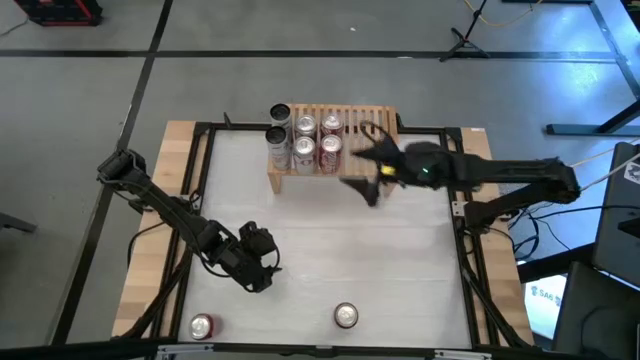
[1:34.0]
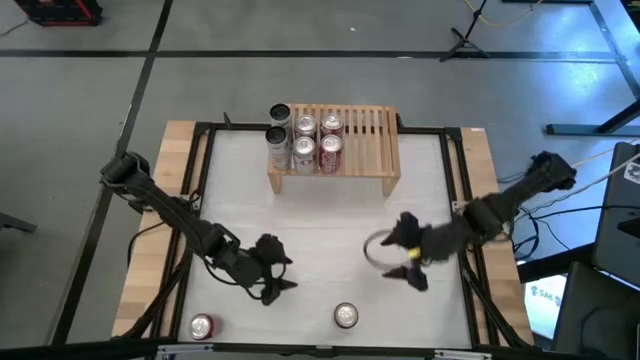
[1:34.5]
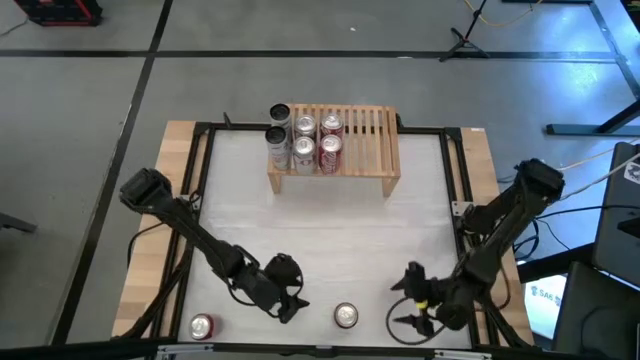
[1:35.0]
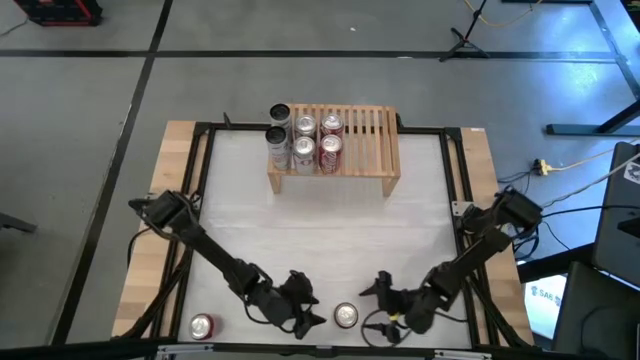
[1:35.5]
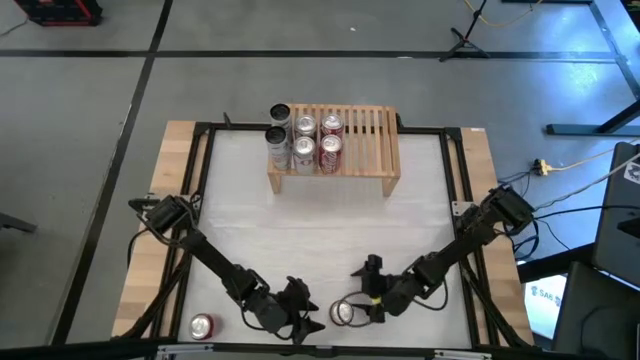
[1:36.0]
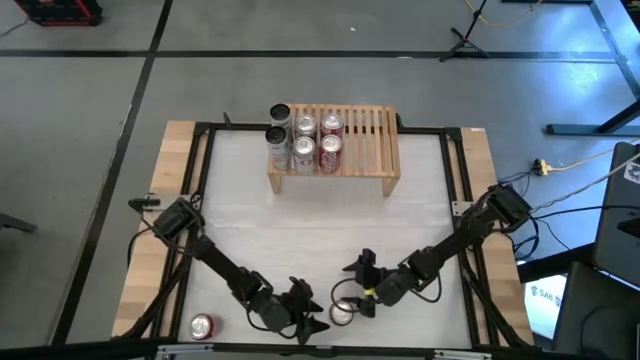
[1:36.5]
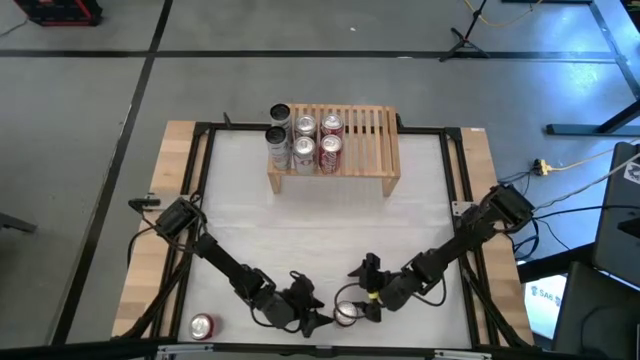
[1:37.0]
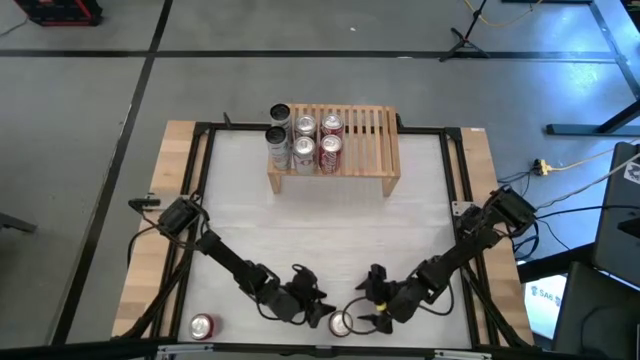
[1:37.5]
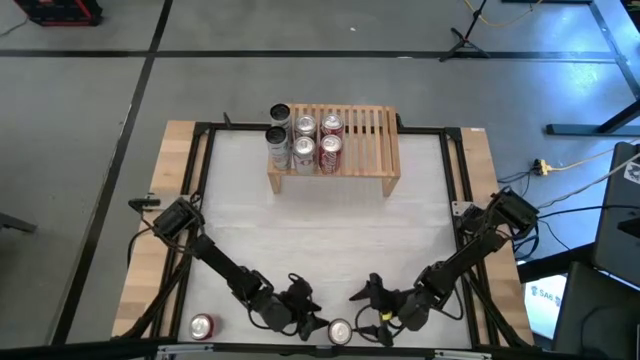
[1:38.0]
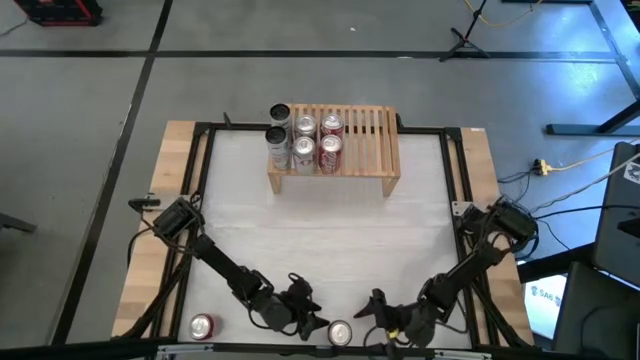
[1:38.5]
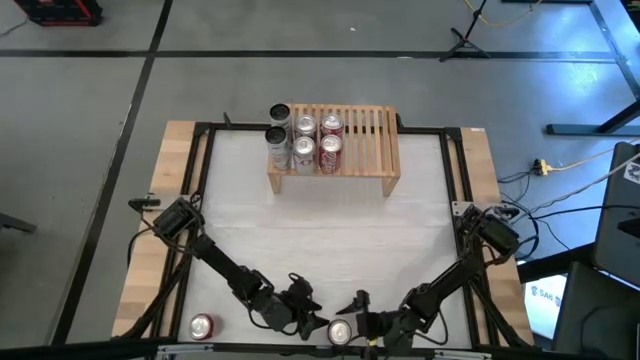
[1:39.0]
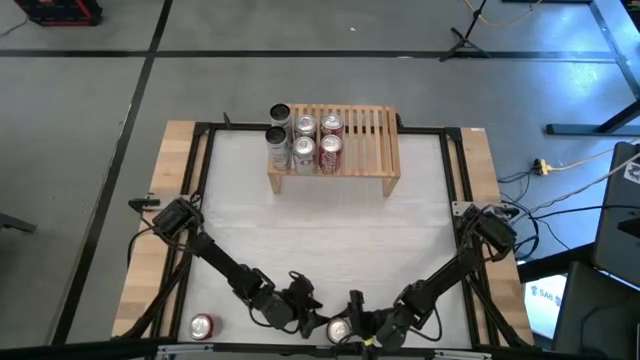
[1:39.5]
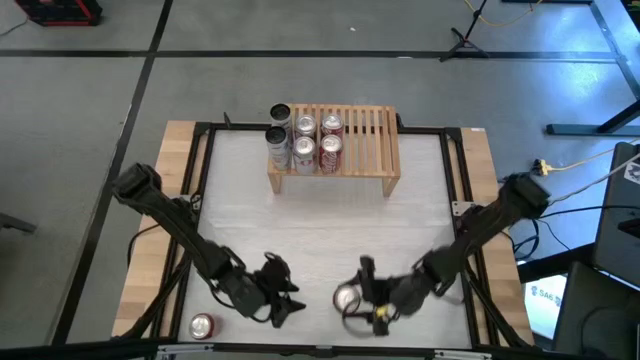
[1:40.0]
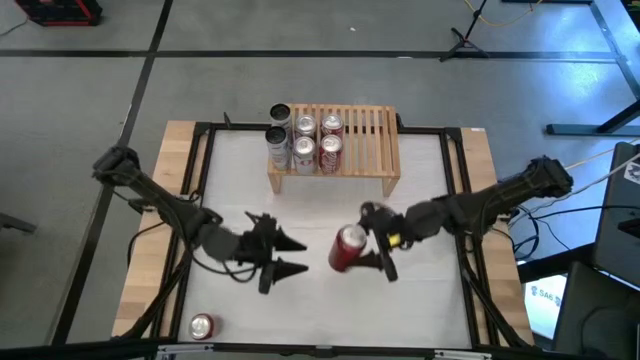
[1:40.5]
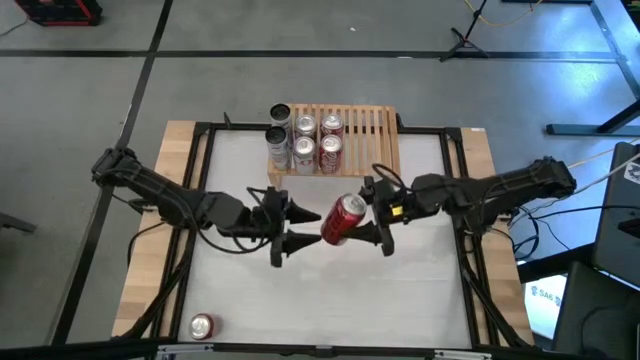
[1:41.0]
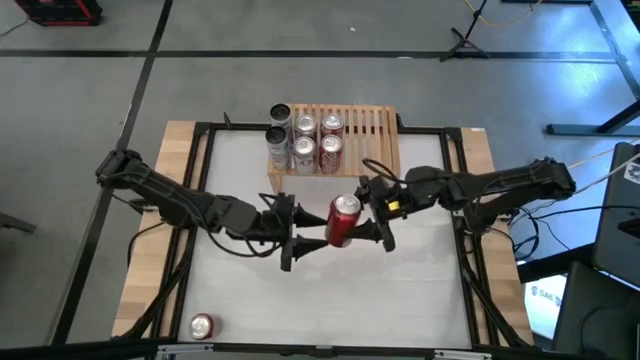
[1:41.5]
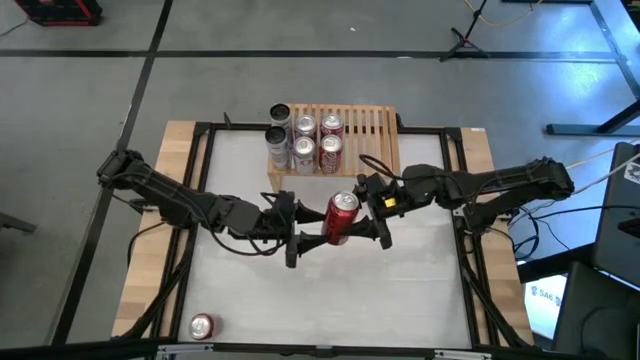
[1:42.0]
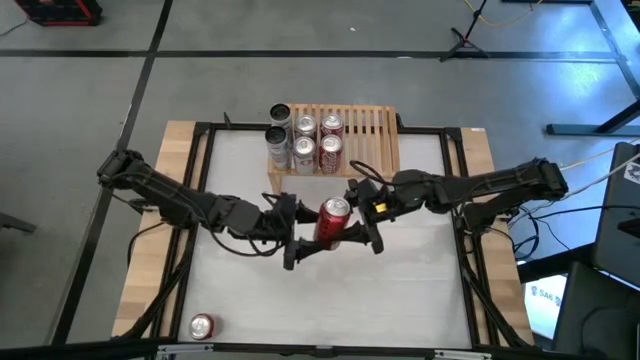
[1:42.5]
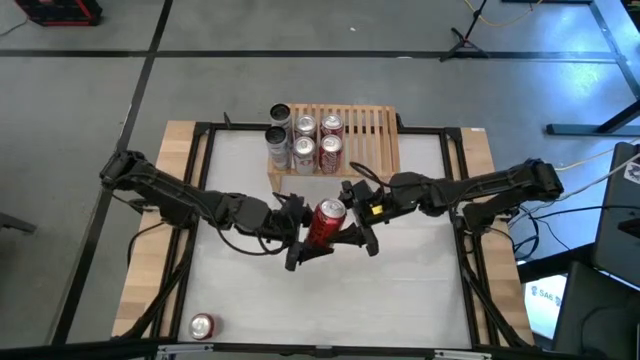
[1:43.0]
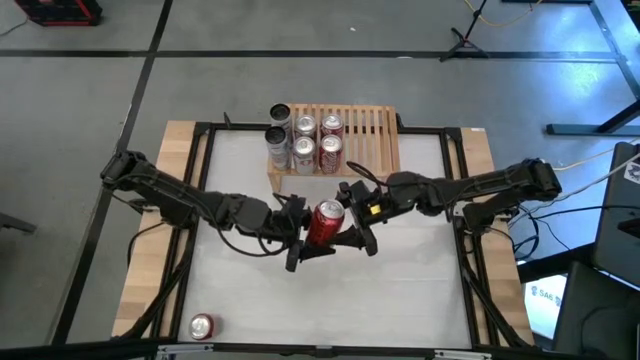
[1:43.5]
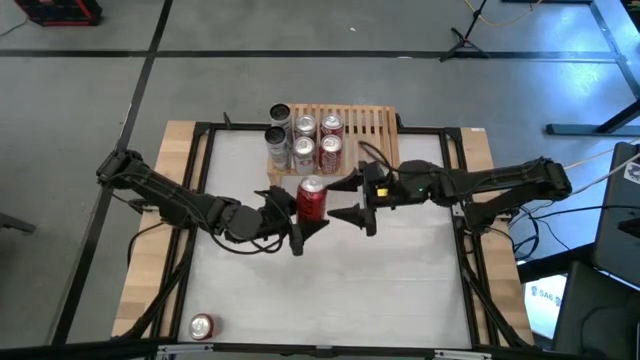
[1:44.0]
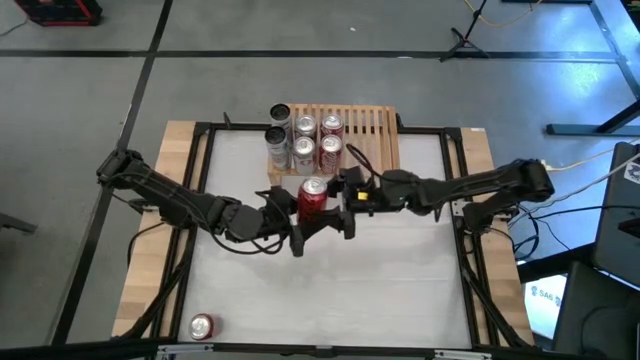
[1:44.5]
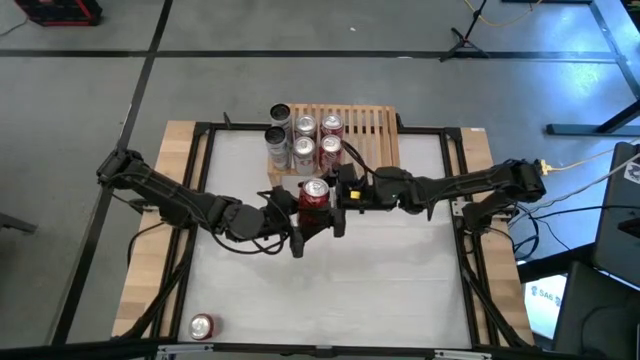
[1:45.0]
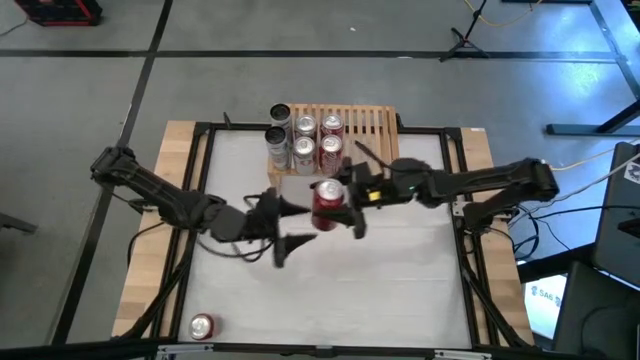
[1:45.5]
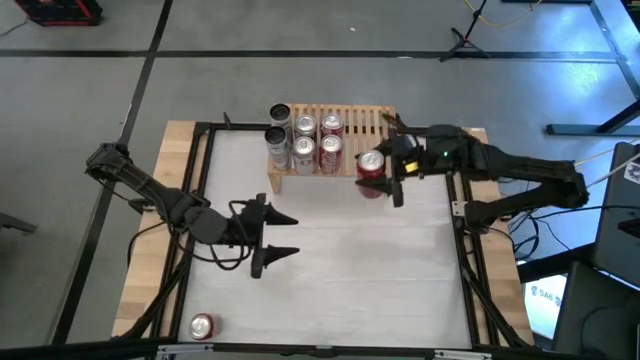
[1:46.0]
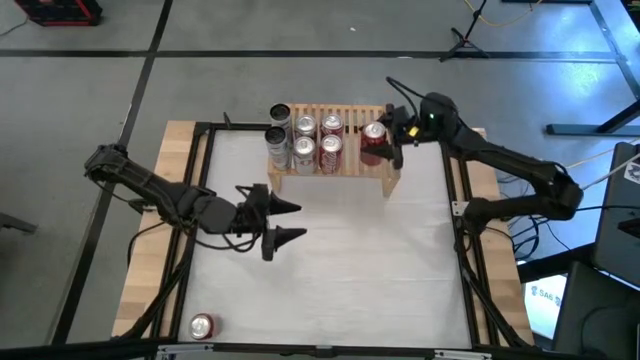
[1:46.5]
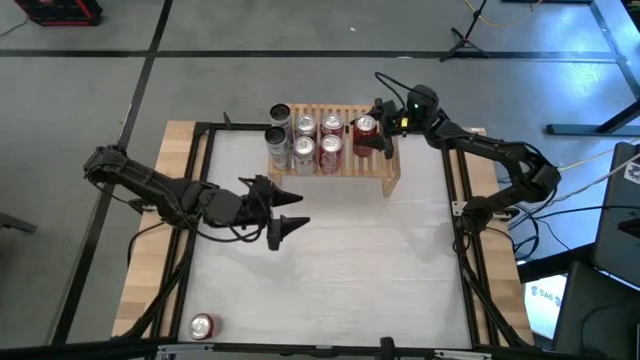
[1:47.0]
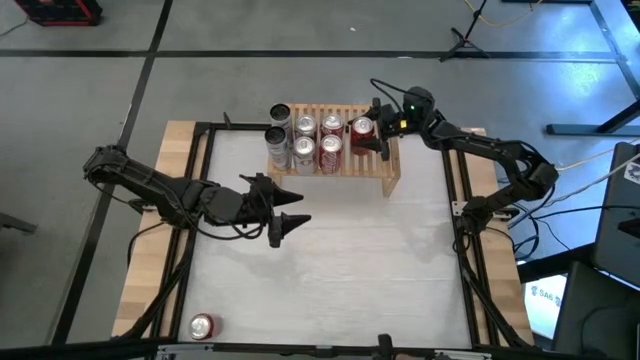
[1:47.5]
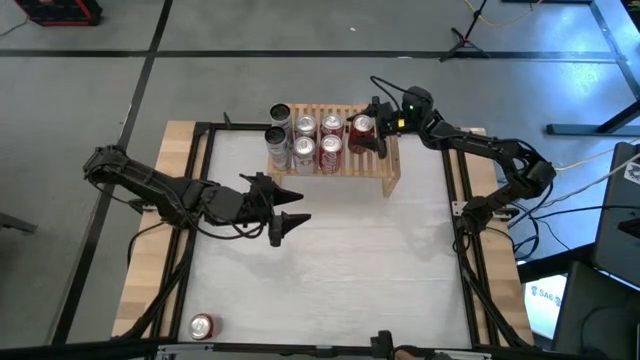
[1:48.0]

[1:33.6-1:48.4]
Task: Place canned beverage on shelf
Put the dark red soda can on the shelf

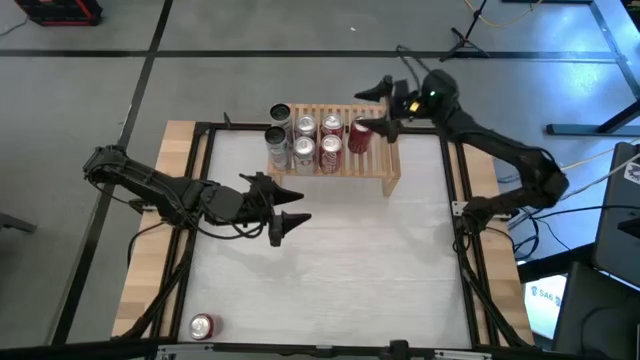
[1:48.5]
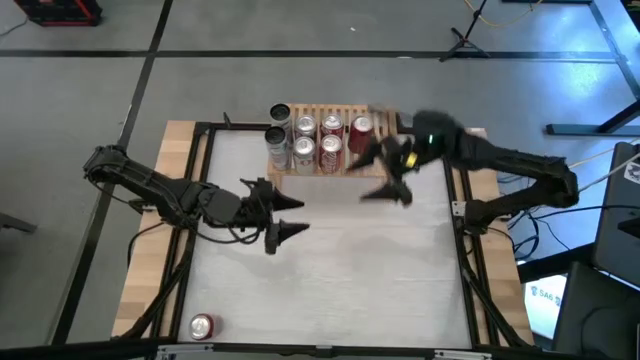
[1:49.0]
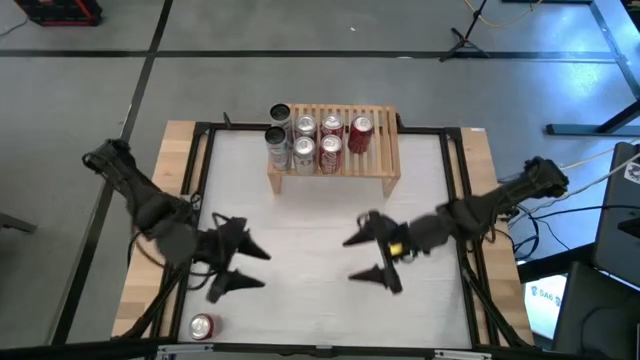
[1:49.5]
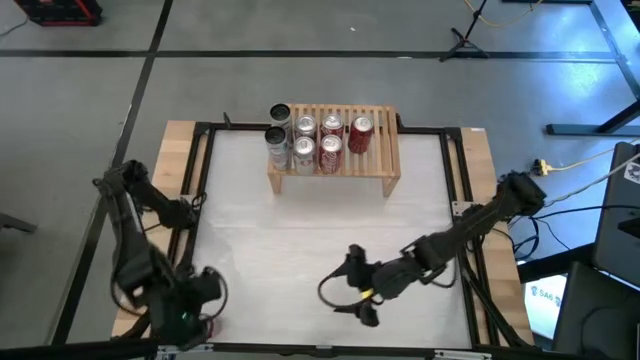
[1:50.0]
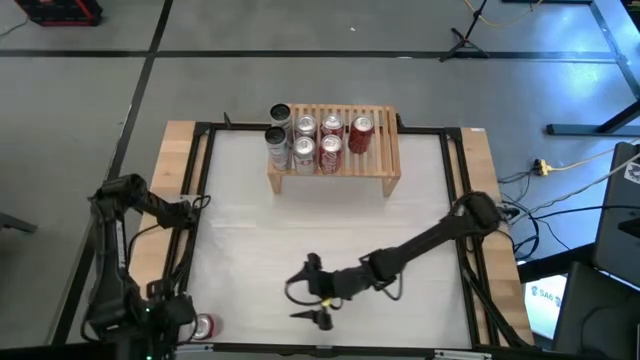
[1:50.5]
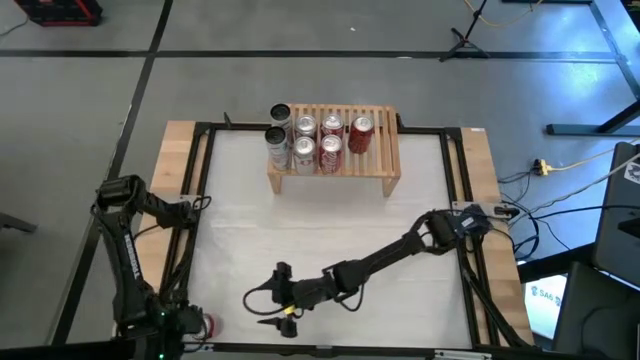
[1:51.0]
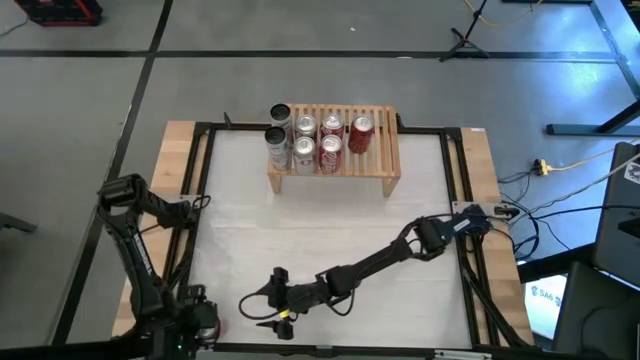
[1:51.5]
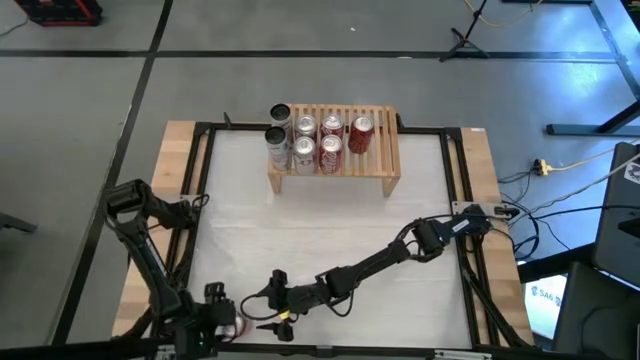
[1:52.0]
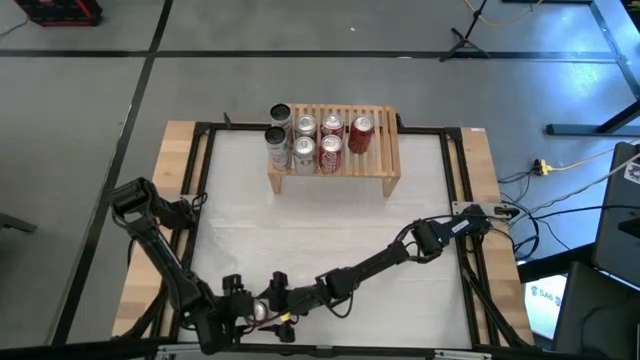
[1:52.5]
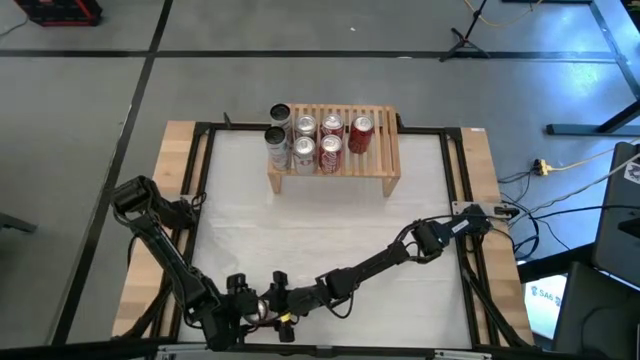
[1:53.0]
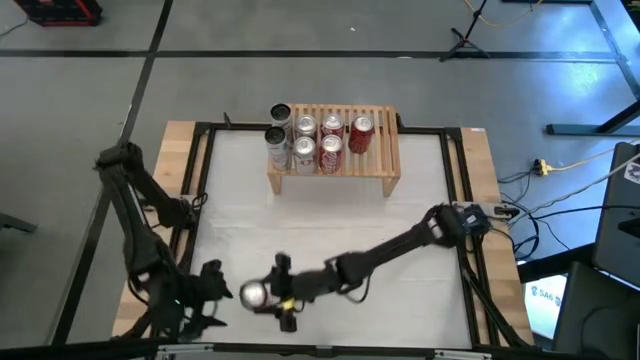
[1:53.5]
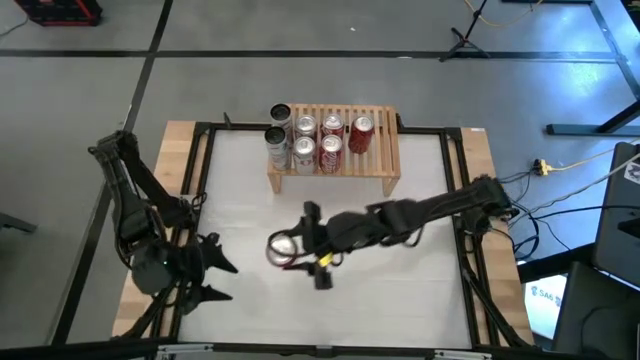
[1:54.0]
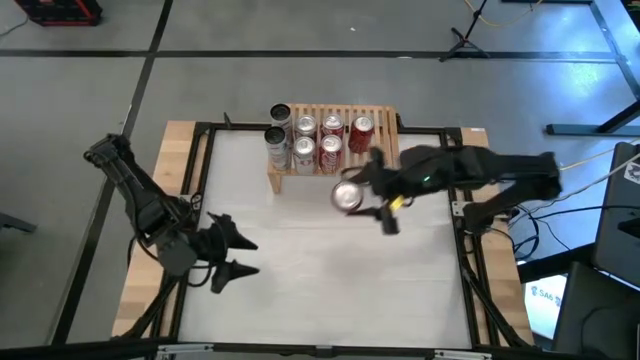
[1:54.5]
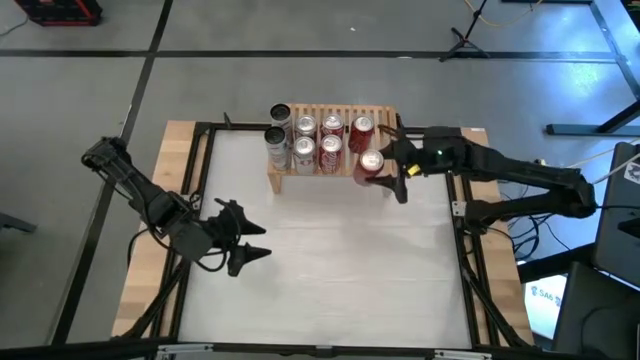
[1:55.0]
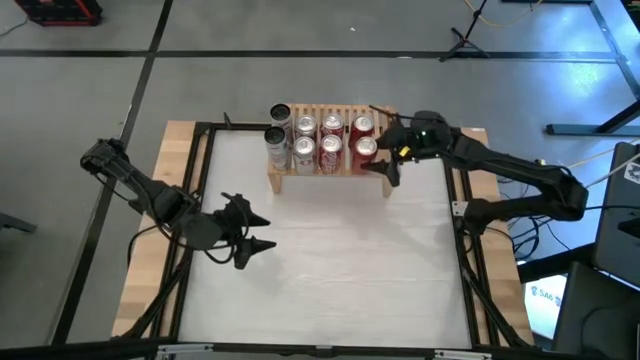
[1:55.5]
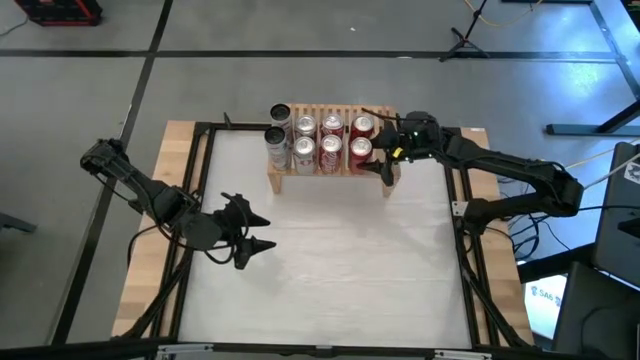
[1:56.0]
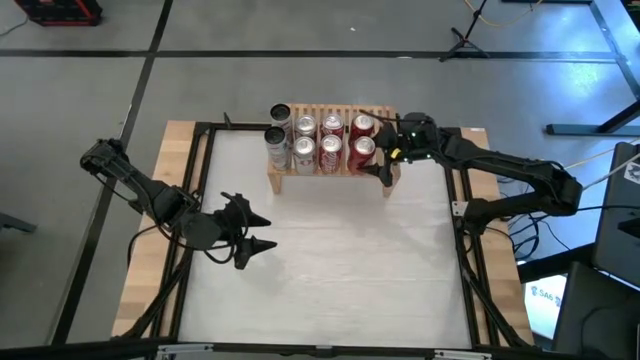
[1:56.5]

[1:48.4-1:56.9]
Put the dark red soda can on the shelf
